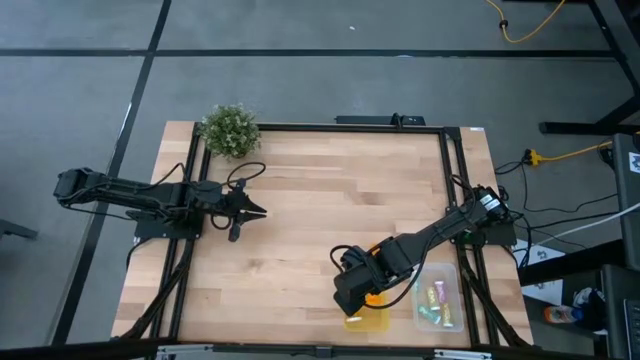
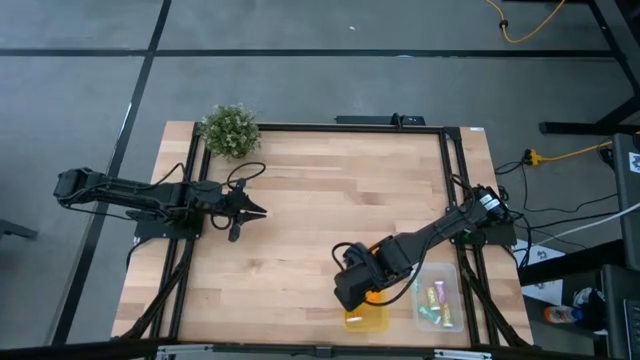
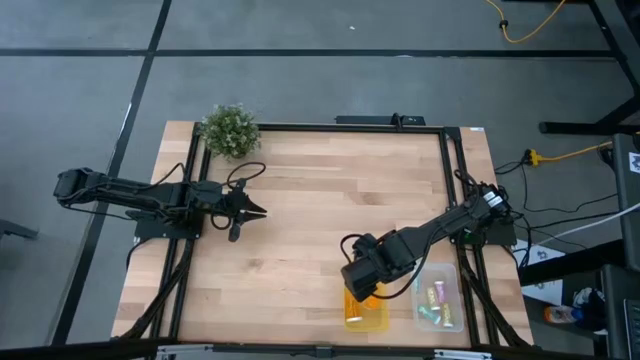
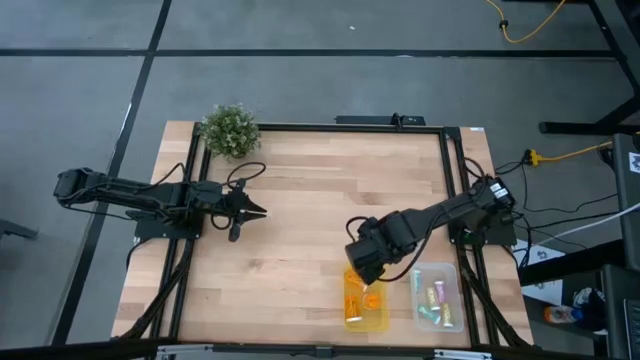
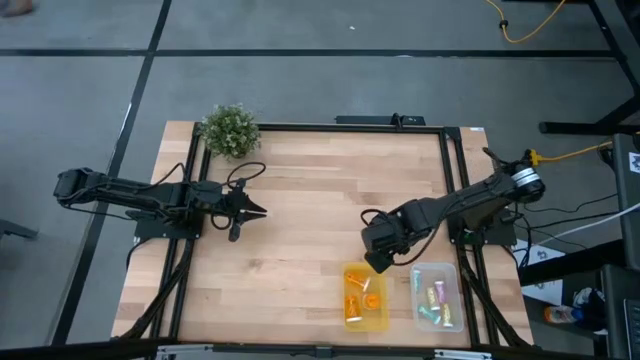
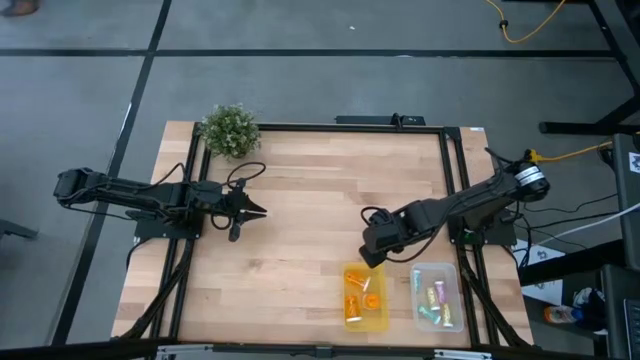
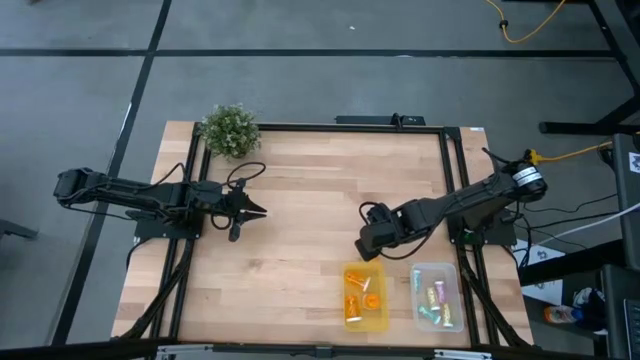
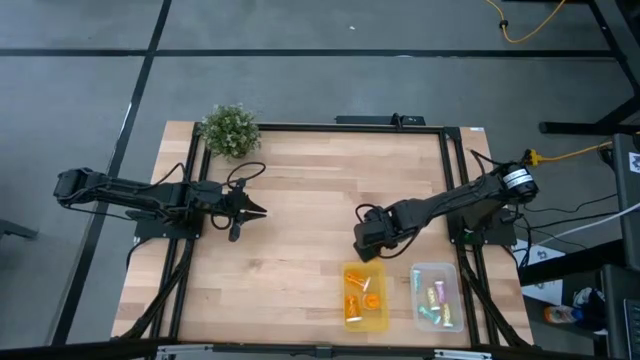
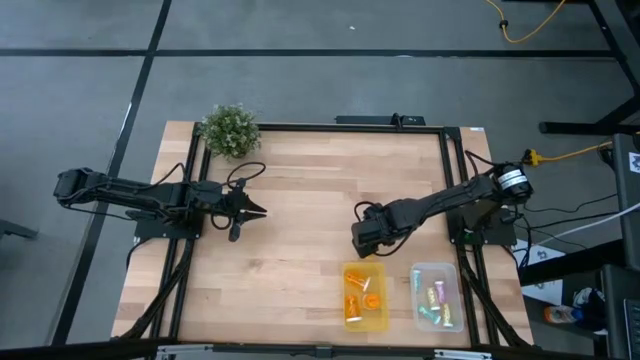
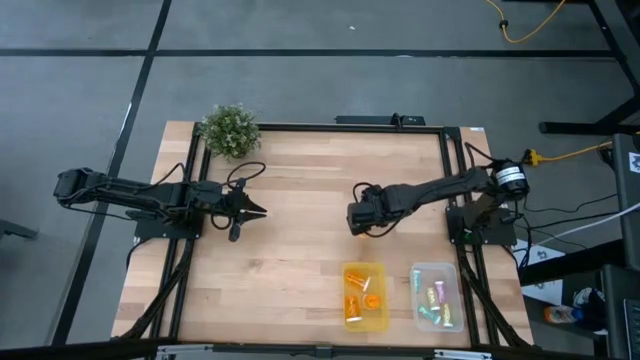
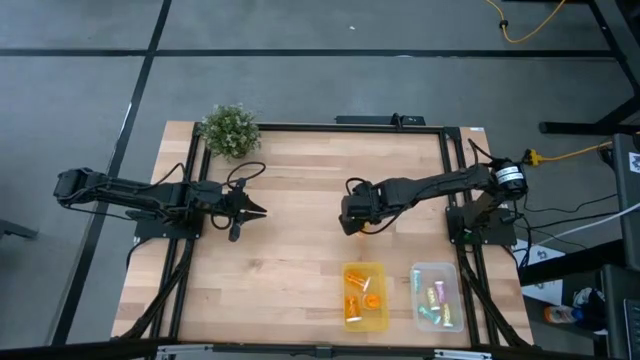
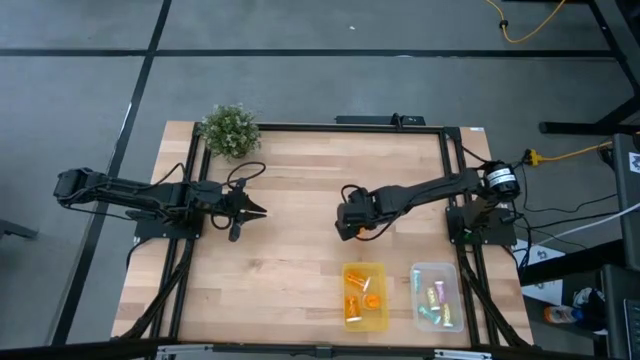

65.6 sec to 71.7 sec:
Task: Pick and place medicine bottles into bin by pill shape (circle, oval)
Put the orange capsule bottle into the yellow bin

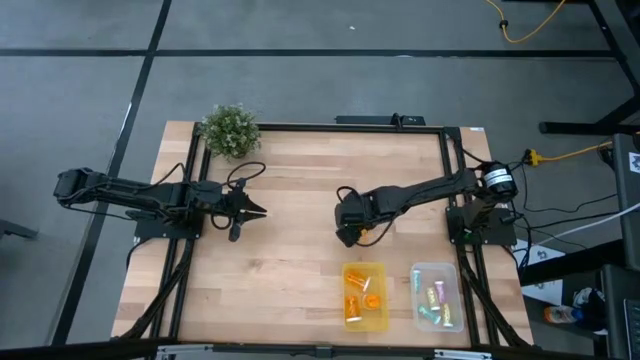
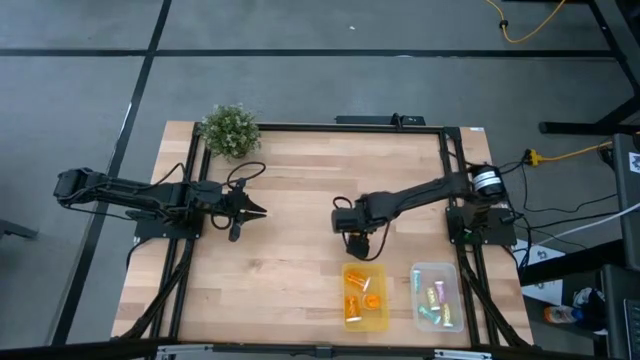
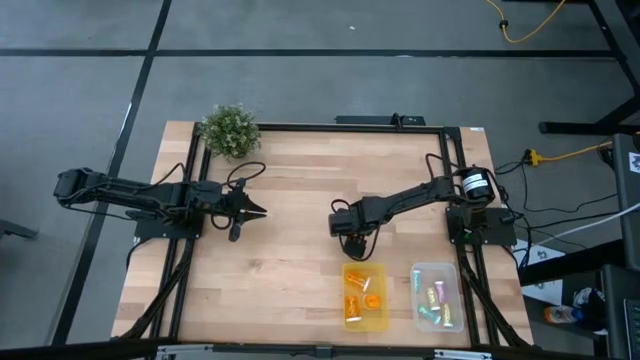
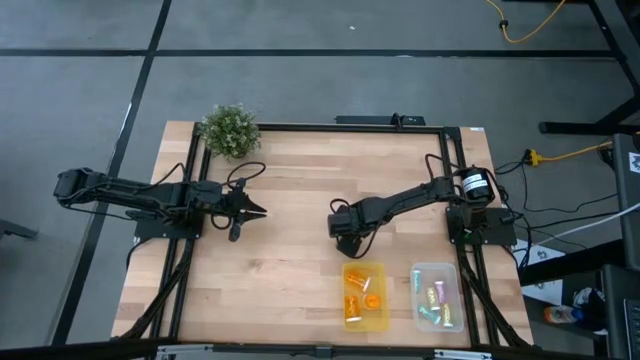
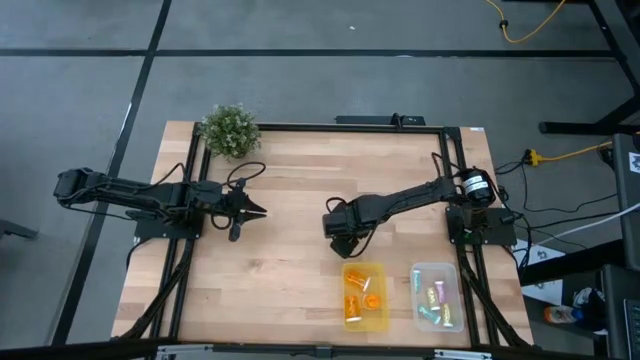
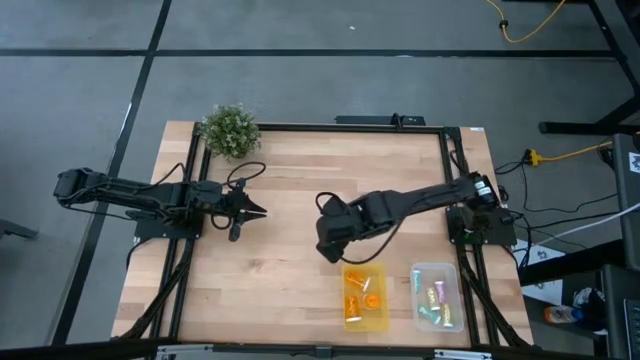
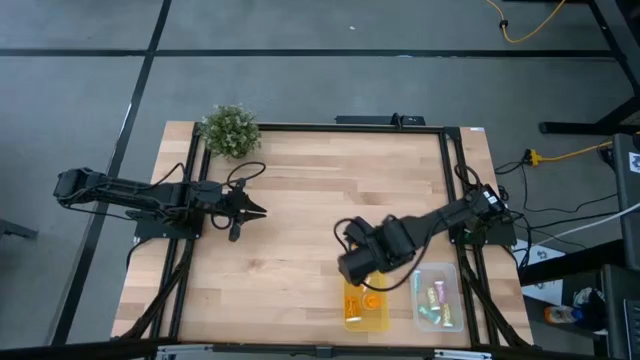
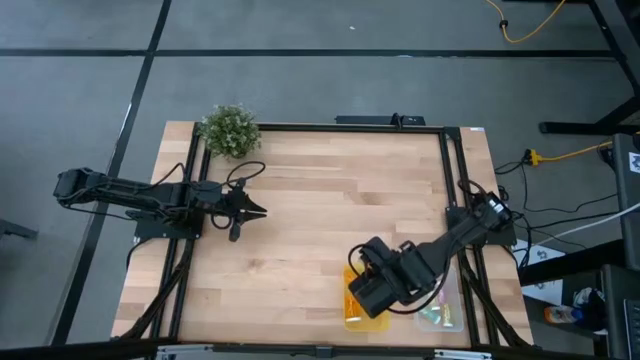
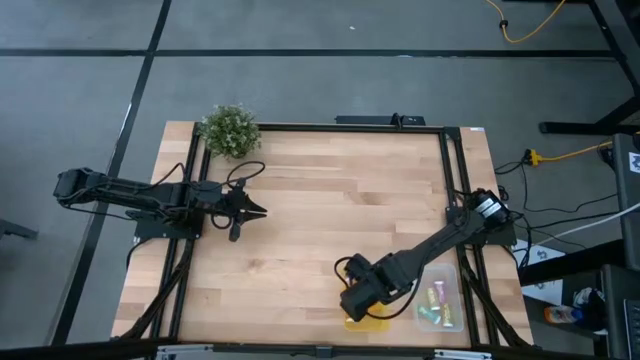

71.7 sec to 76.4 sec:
Put the orange capsule bottle into the yellow bin

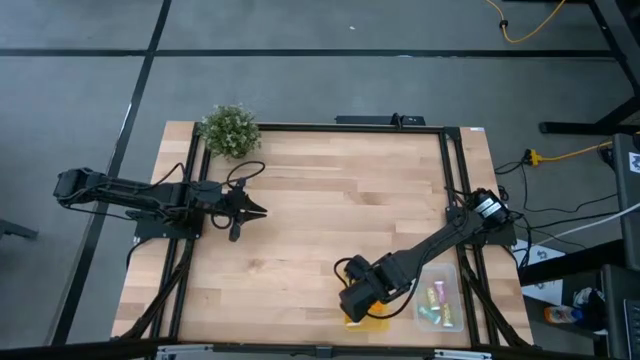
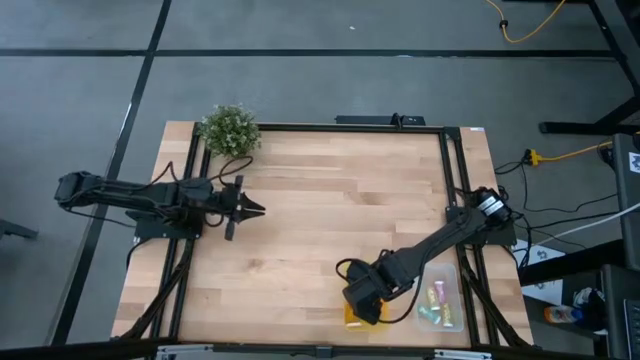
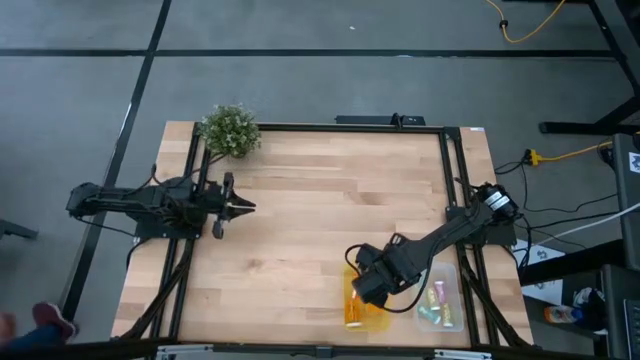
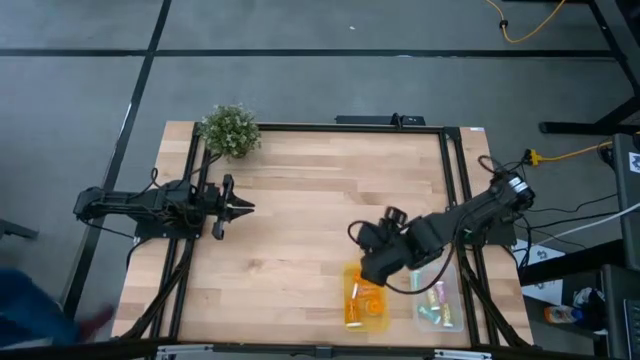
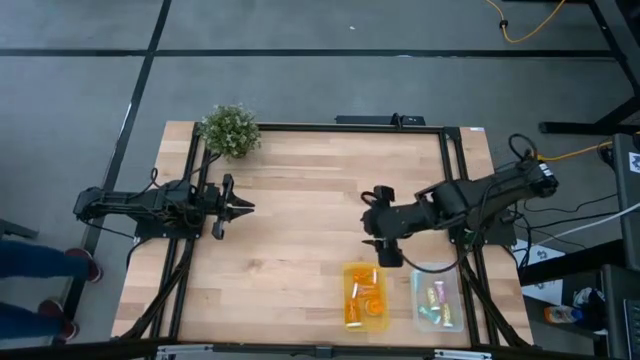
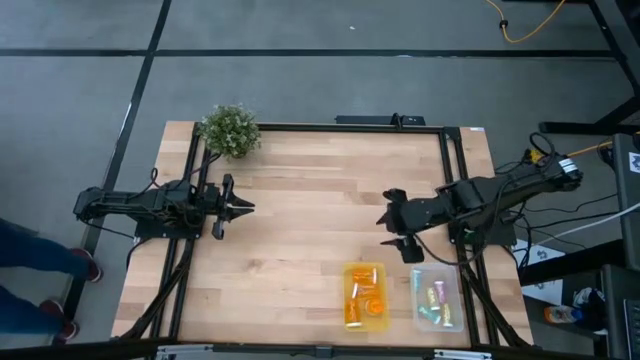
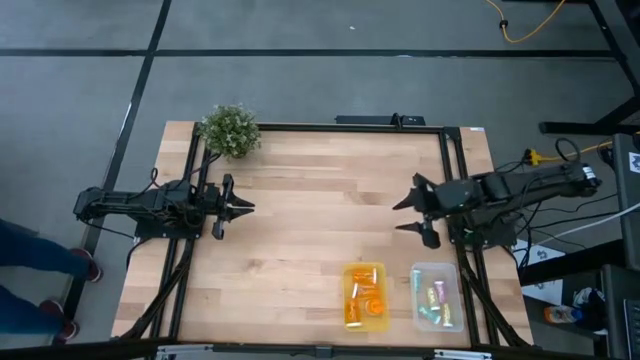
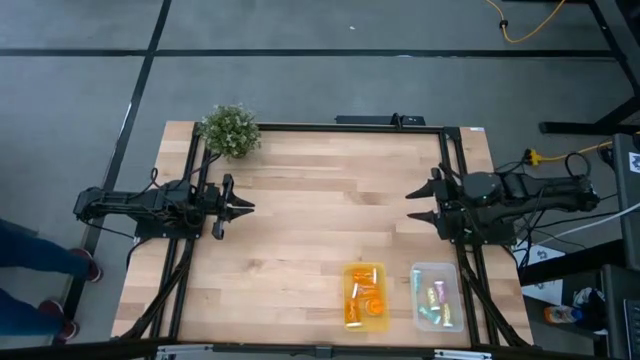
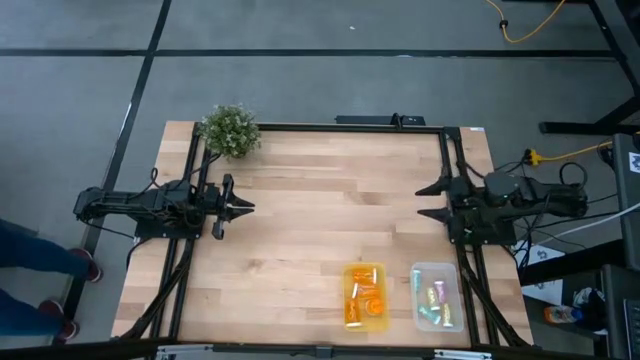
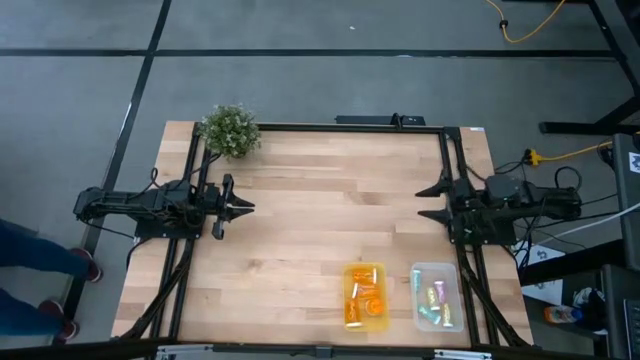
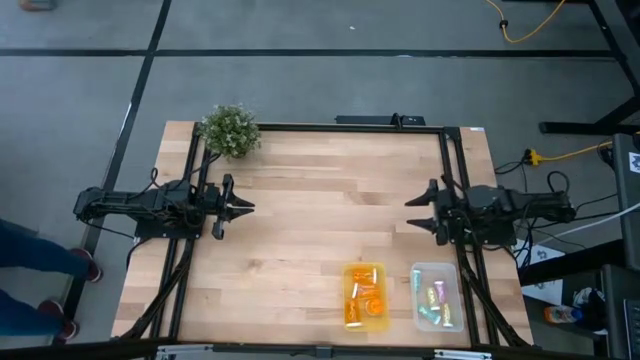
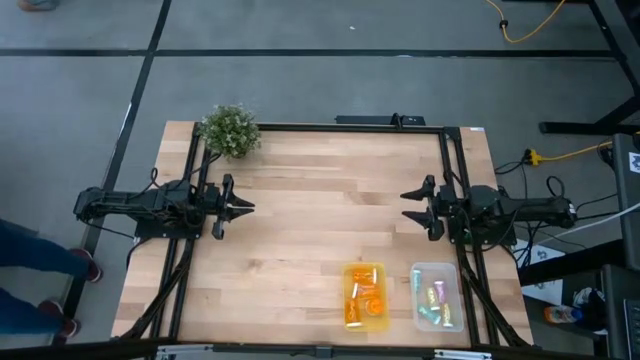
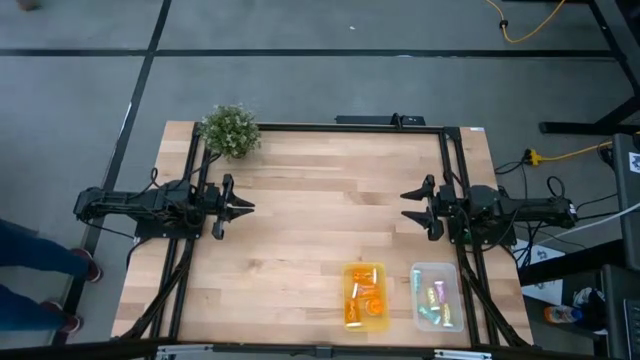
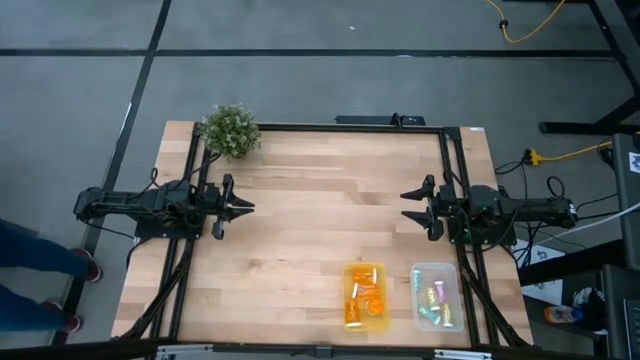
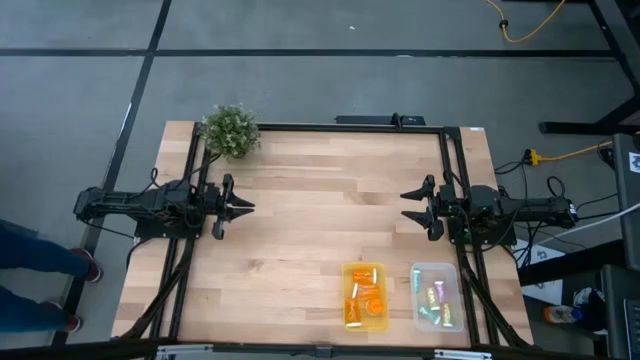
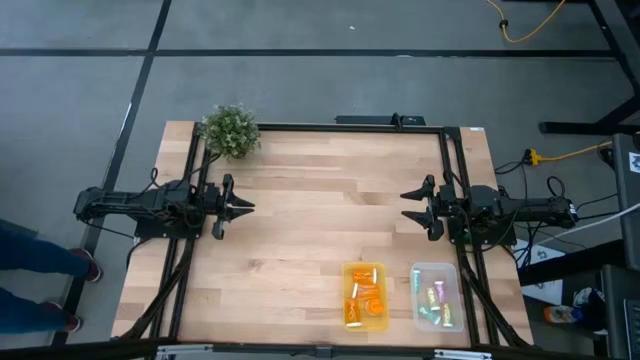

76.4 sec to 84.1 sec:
Return to Home Position

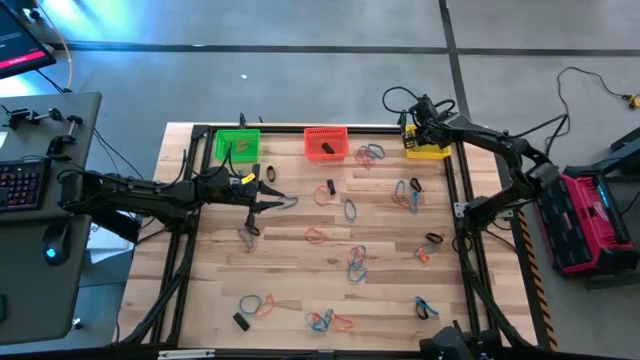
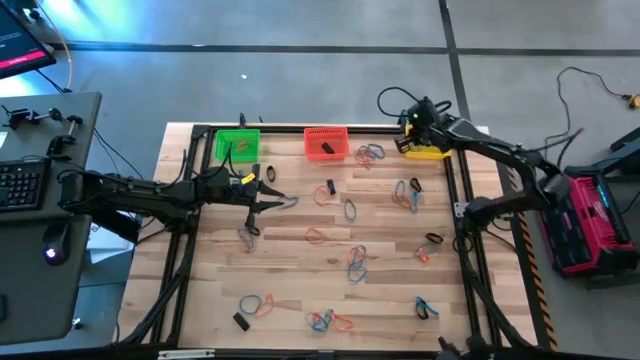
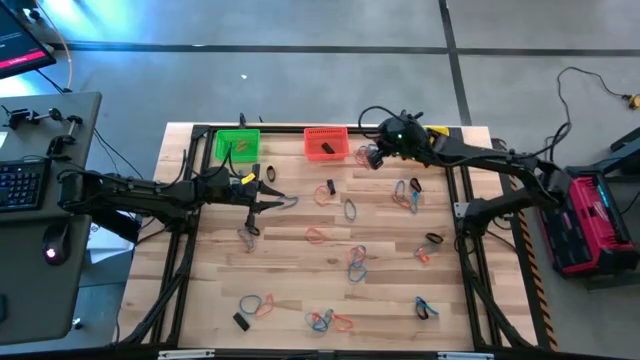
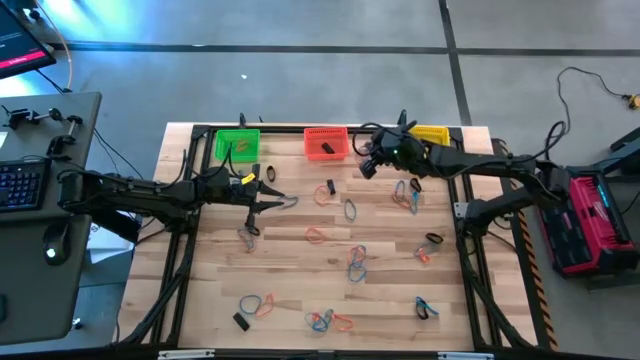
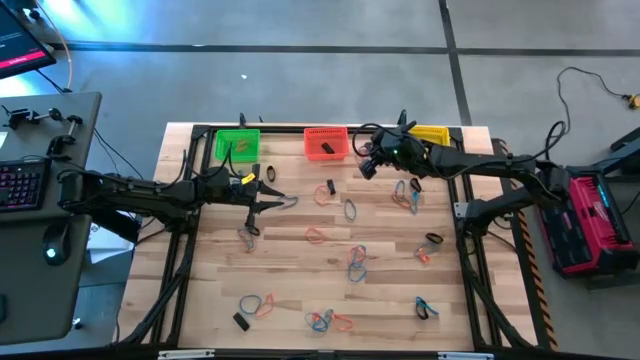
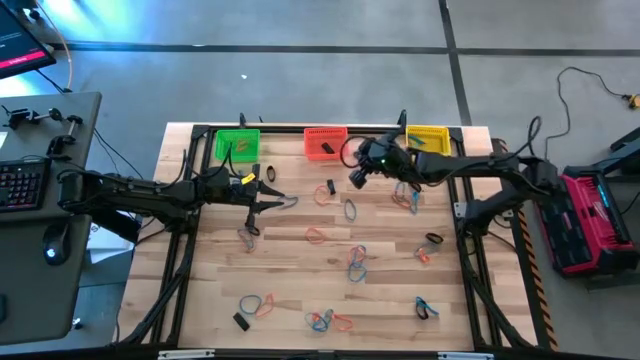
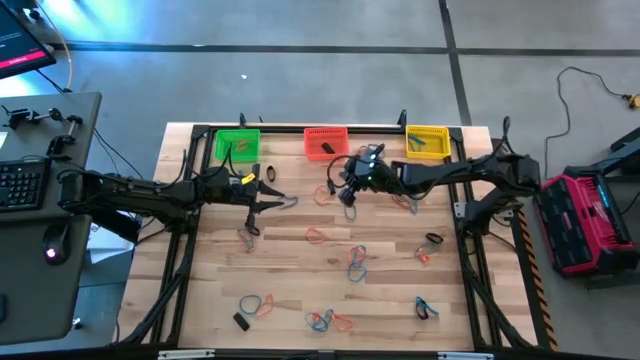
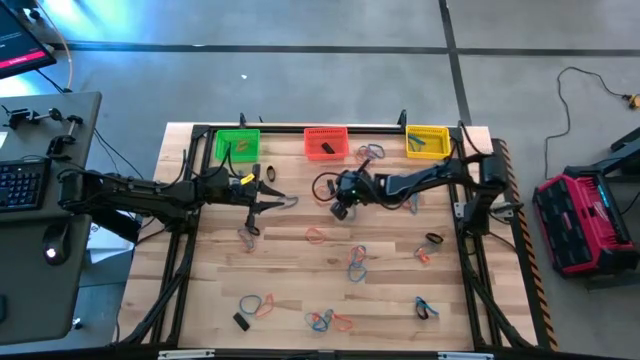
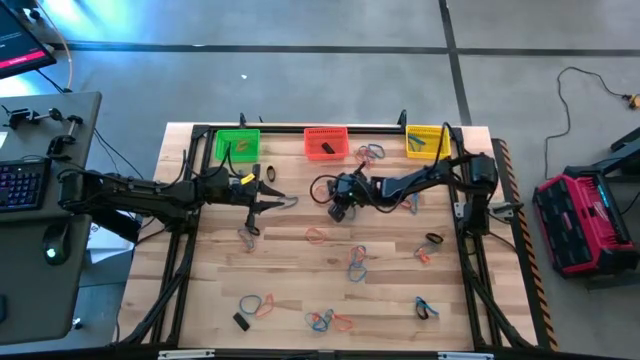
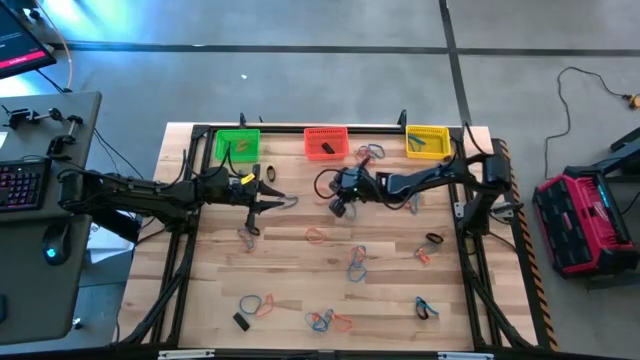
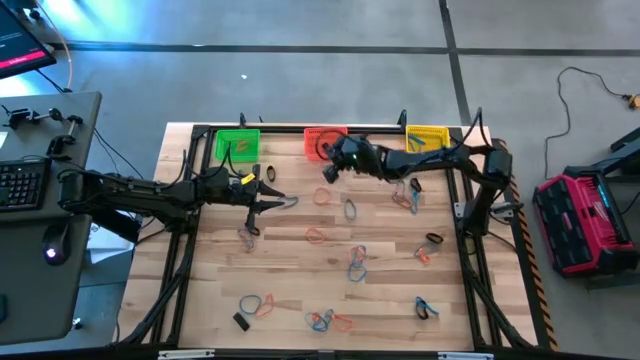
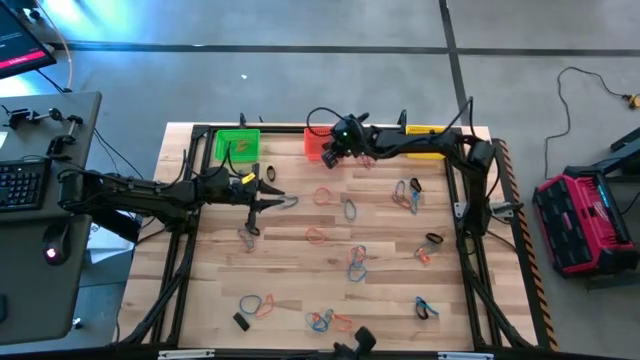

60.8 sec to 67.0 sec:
Task: Sort rubber bands into baskets
Put the black rubber band into the orange bin
